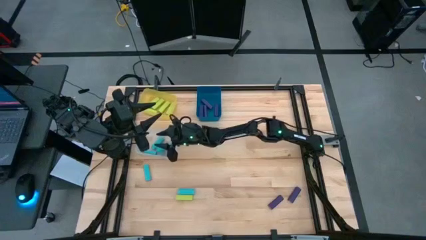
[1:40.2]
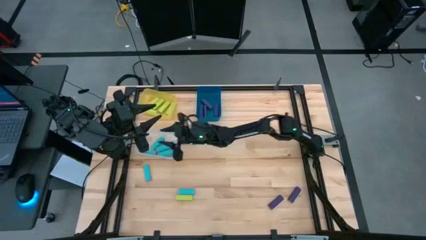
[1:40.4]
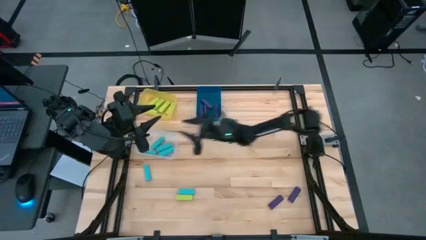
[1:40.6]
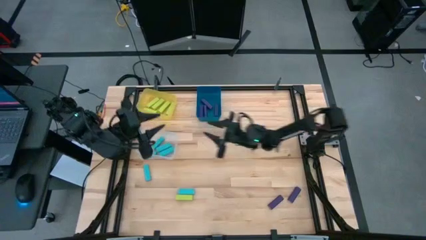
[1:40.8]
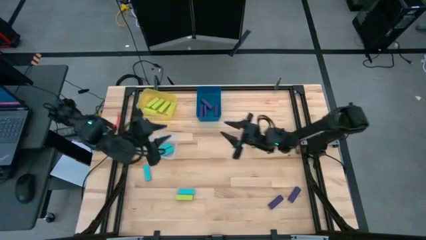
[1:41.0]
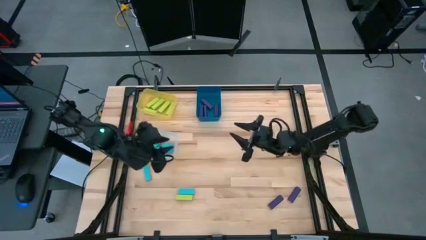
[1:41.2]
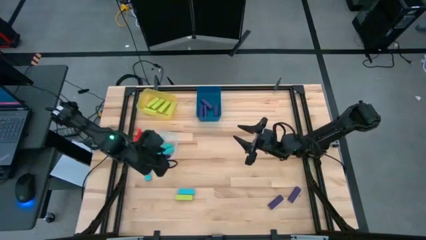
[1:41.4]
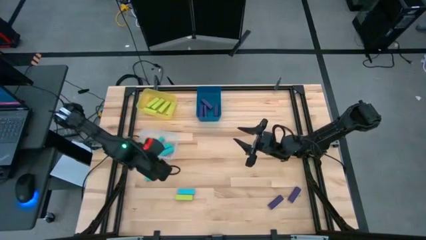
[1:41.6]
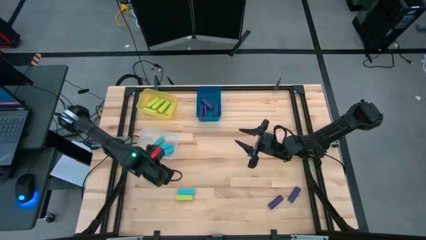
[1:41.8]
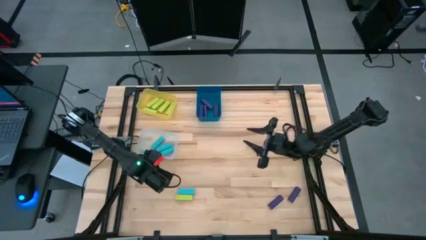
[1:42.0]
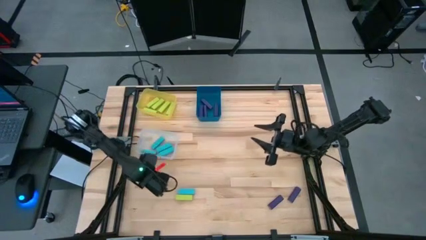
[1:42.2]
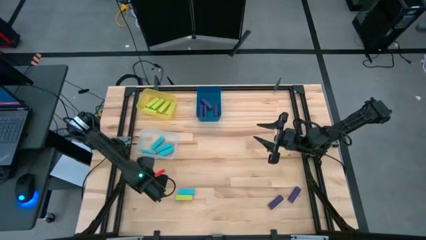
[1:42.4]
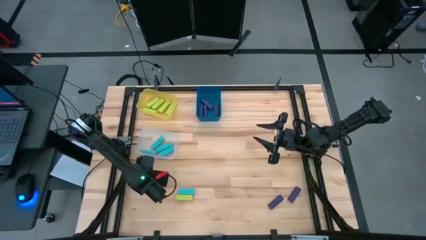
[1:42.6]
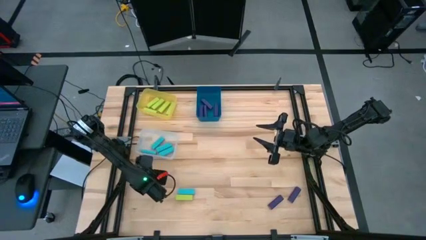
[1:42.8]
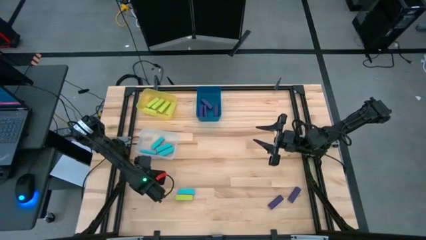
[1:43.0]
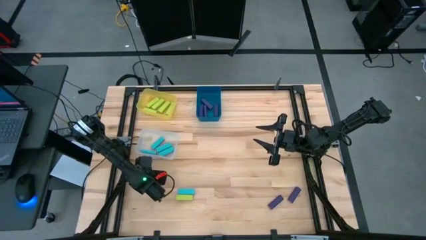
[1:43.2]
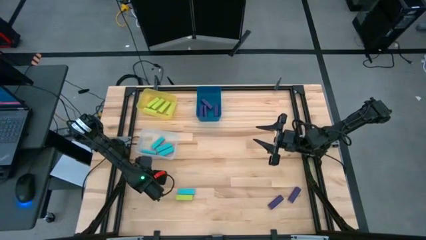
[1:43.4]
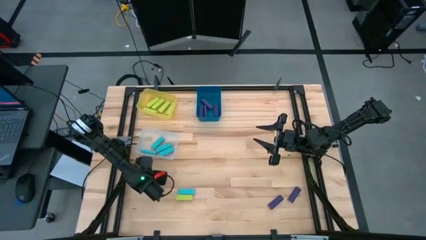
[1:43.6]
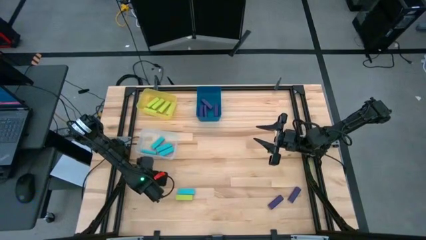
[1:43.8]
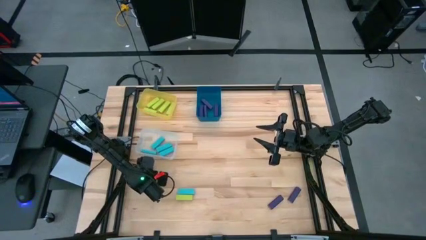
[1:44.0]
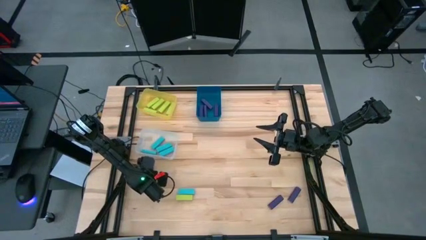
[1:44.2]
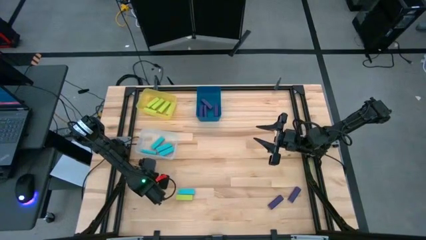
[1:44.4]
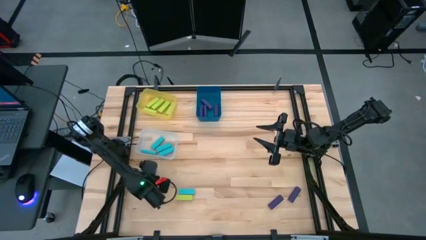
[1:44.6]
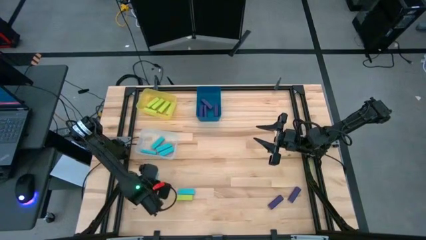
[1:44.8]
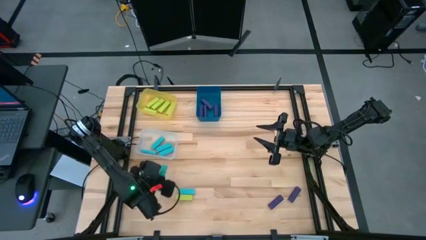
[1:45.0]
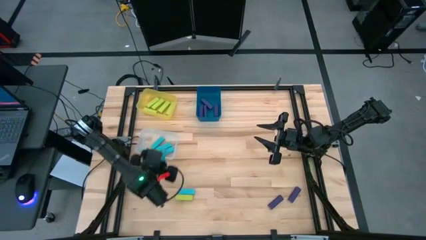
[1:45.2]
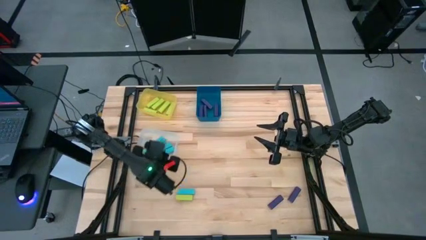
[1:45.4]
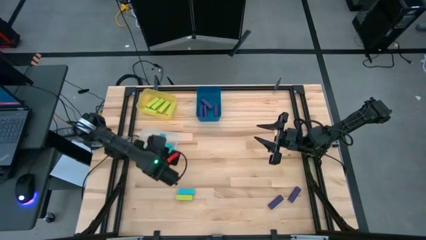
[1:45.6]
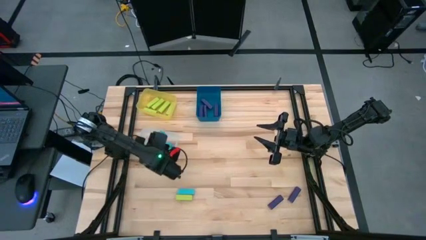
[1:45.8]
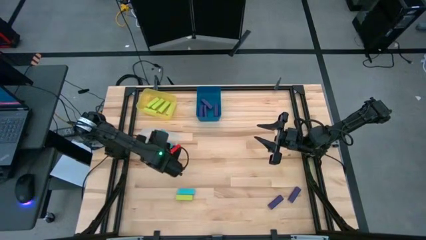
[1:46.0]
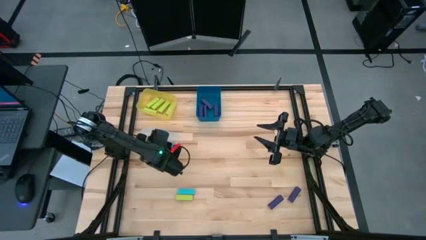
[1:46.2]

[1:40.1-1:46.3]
Task: Sort blocks
Put the blue block into the white bin

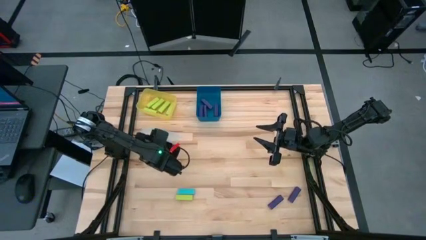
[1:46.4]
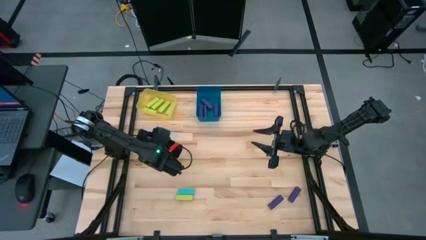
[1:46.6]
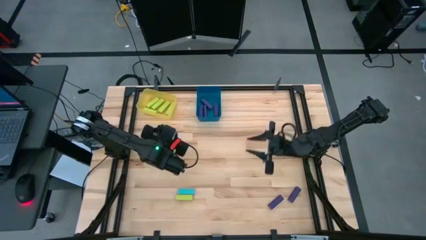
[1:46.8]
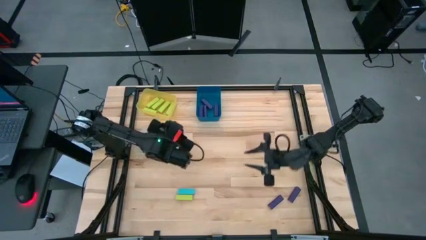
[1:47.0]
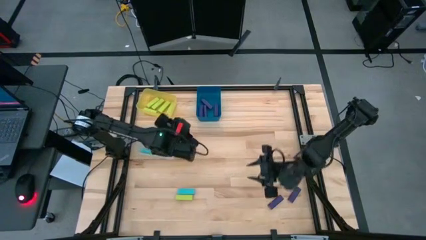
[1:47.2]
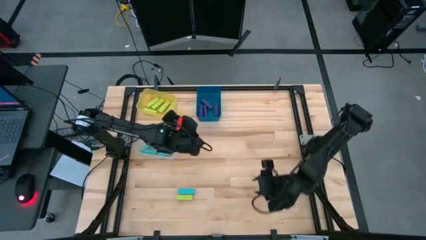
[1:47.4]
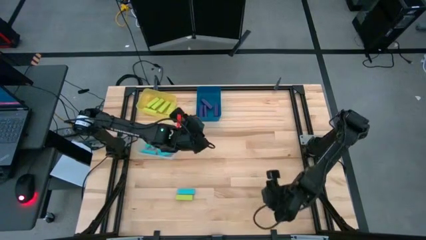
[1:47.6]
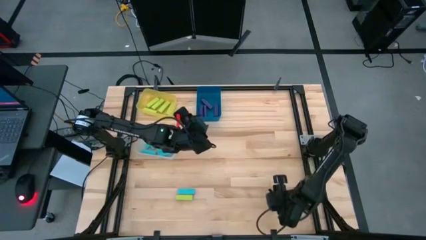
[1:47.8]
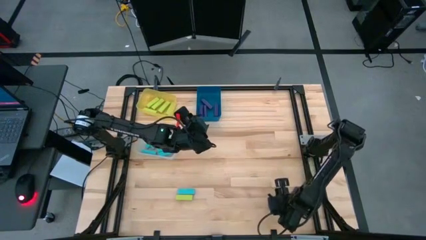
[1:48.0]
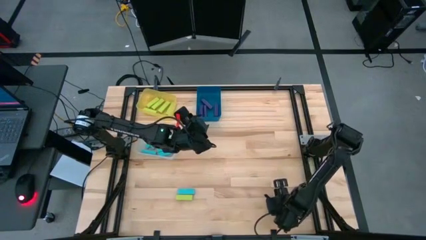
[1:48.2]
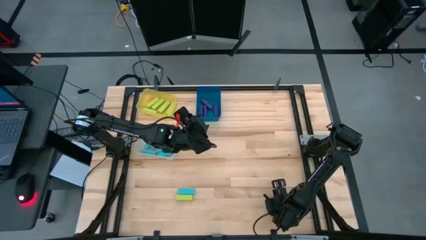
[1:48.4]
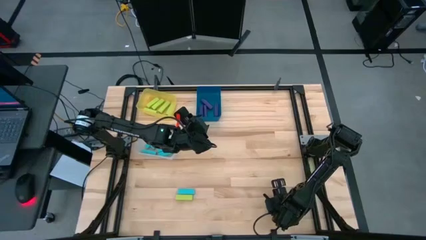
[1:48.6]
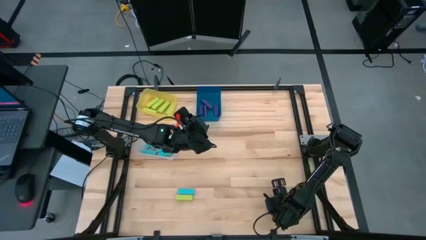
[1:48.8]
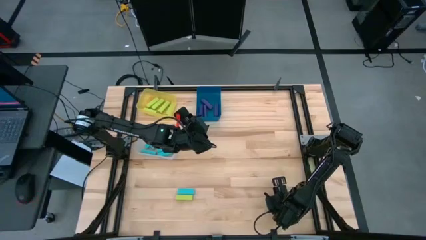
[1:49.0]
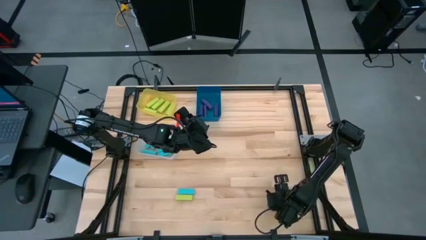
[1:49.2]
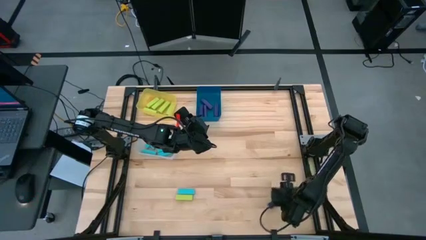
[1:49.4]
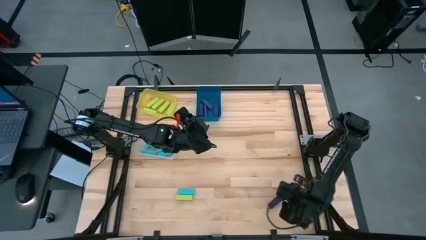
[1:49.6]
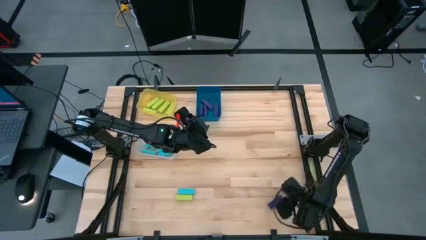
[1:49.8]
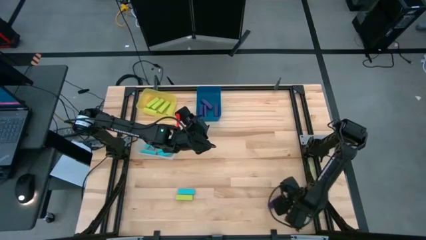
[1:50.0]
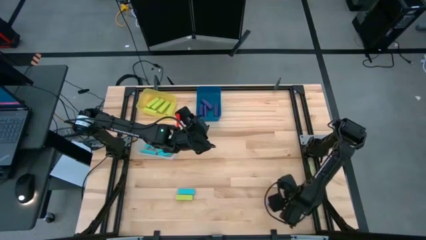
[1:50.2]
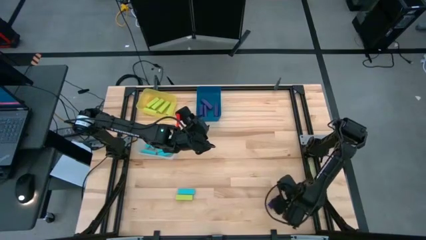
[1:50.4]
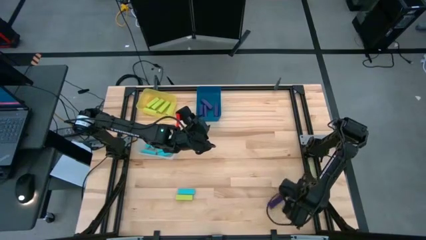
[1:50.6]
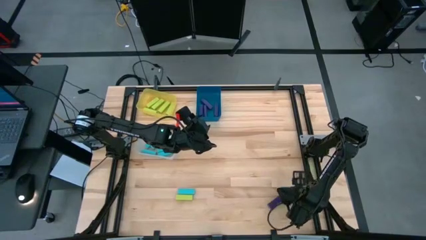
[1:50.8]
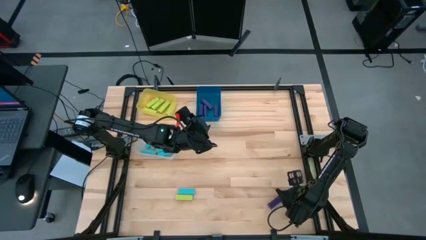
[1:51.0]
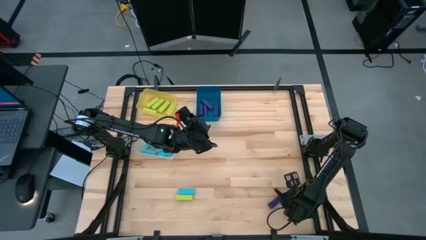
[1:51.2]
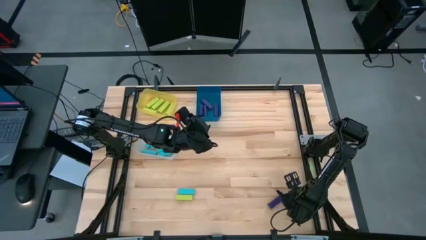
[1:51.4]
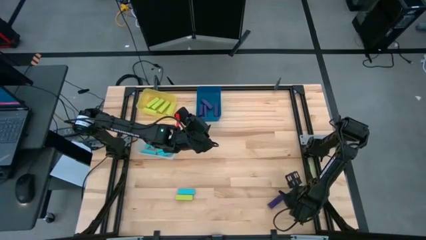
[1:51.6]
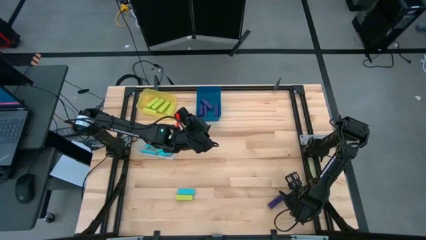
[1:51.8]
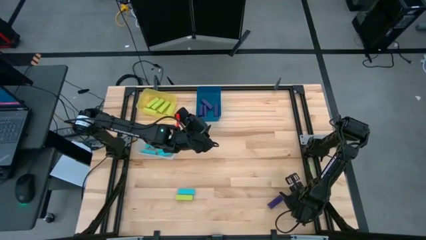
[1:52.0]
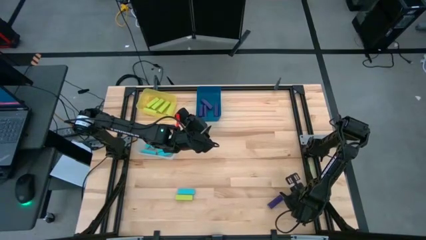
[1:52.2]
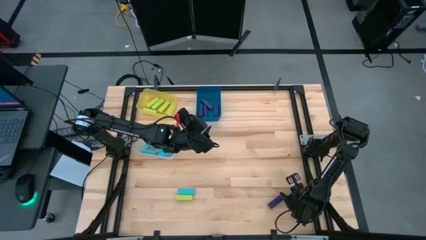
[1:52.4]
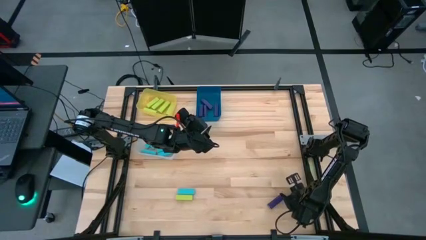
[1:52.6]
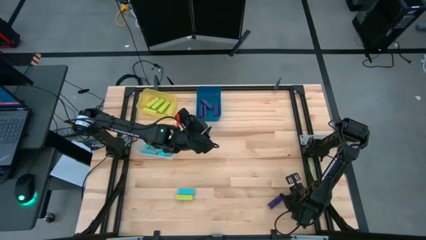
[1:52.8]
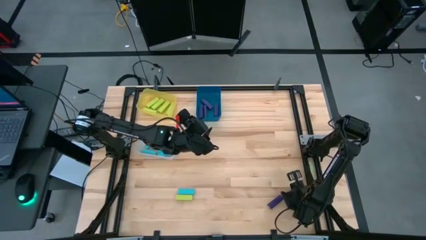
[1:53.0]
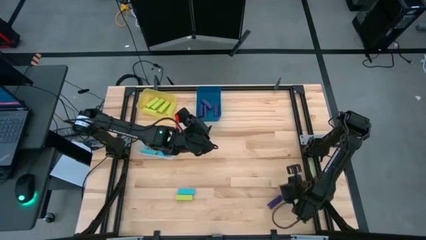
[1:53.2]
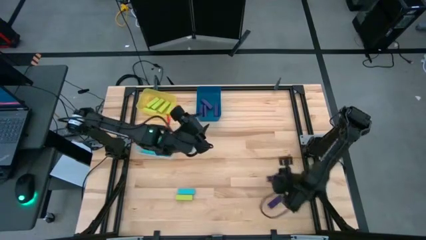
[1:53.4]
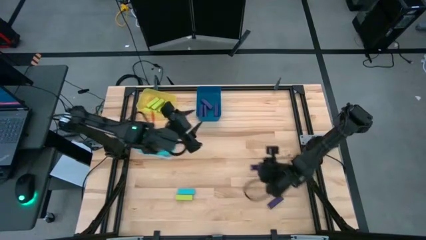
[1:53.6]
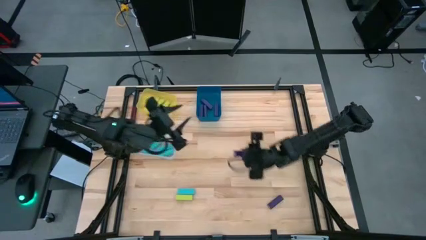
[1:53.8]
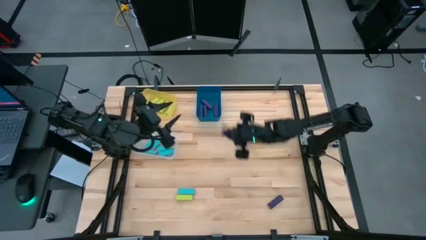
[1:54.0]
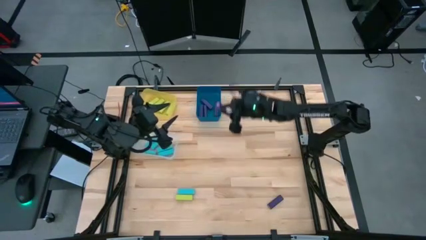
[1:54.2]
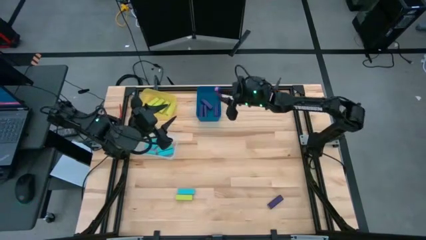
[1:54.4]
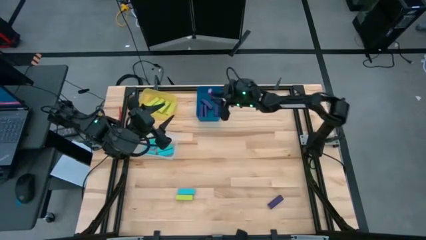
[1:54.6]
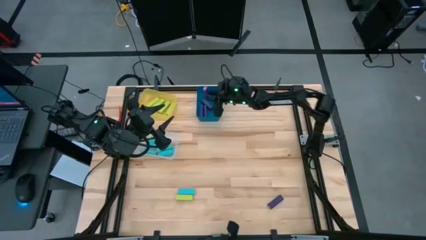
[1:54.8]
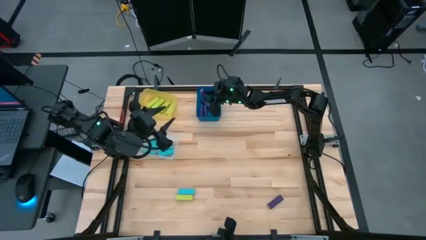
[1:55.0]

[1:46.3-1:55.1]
Put the purple block into the blue bin

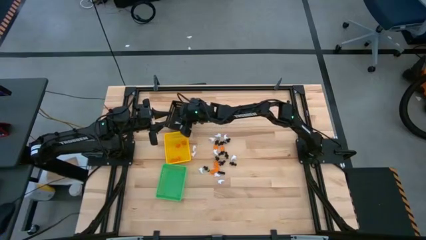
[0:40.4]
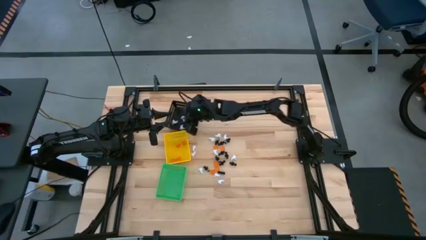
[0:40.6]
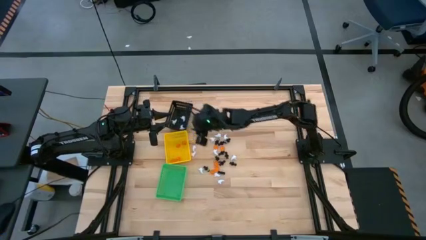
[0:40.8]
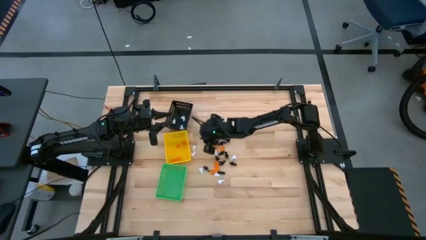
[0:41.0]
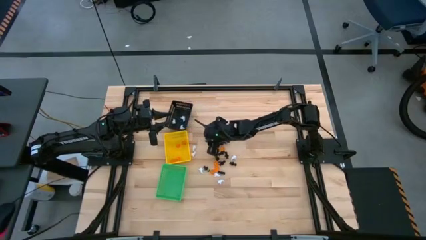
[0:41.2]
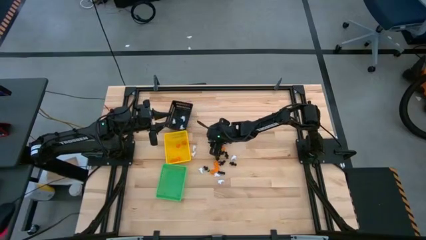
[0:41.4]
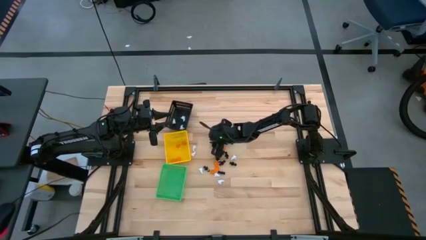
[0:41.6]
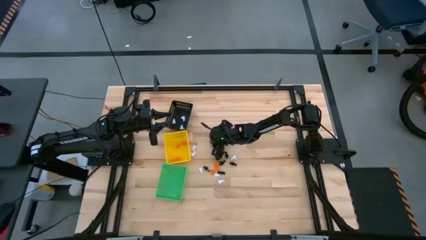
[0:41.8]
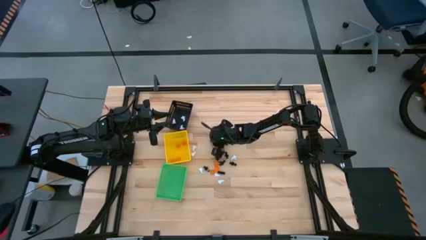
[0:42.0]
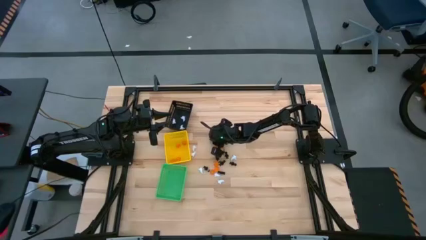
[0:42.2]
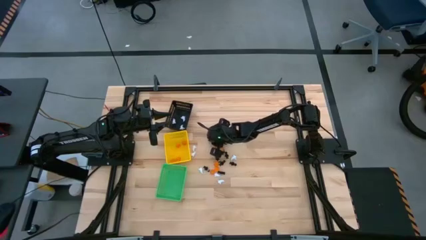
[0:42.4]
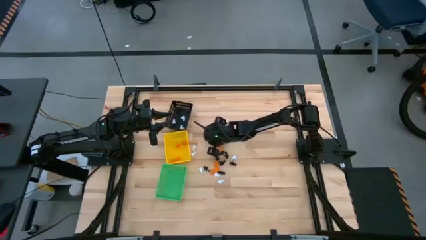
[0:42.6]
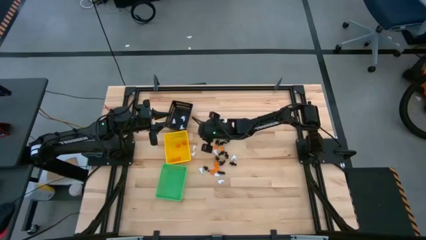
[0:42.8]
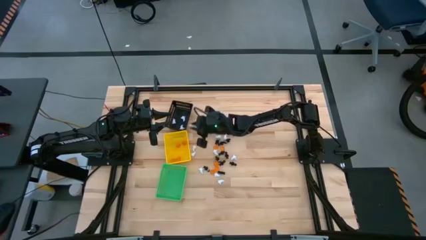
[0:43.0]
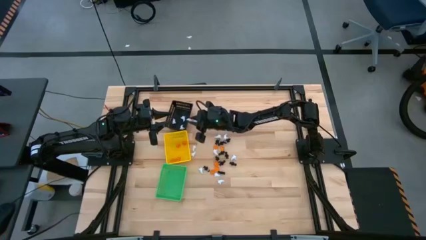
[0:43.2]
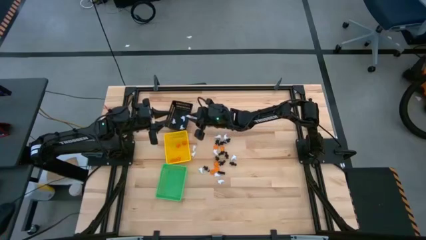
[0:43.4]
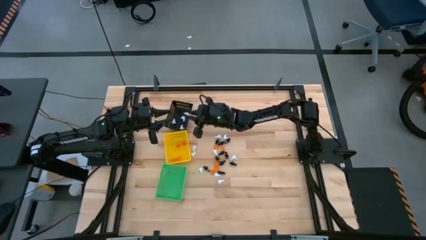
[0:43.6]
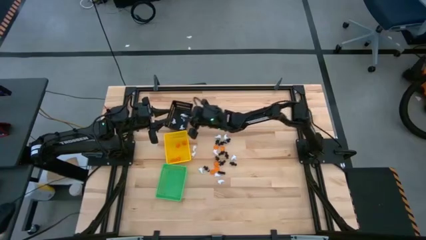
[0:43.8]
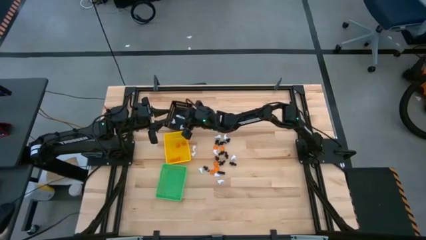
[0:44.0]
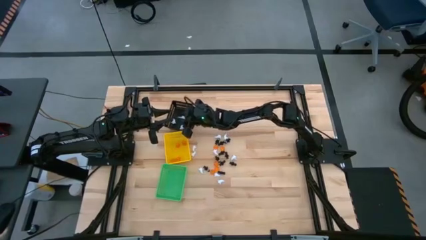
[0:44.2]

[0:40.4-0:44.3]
Task: Sort Halloween decoration
Put the white ghost plush toy into the black basket
